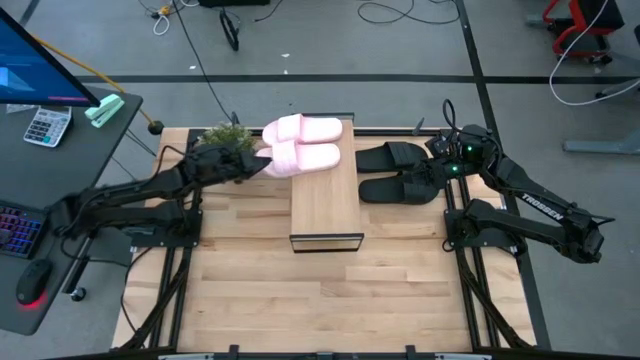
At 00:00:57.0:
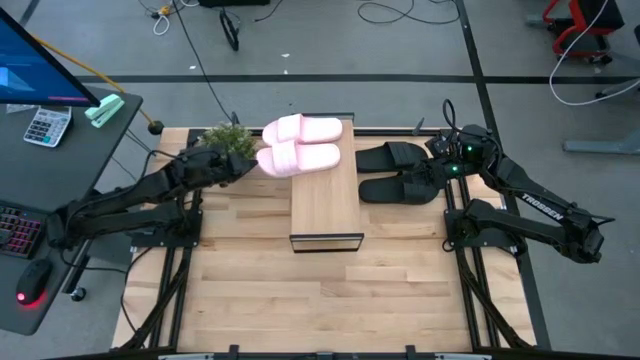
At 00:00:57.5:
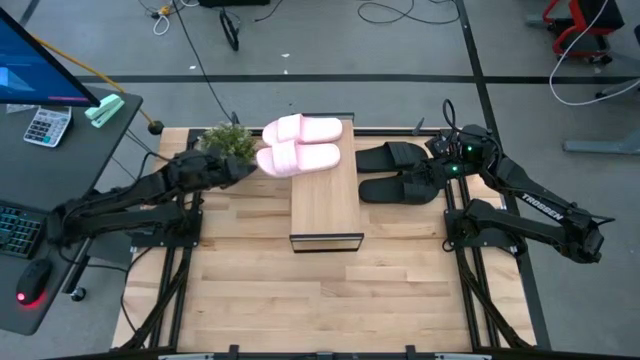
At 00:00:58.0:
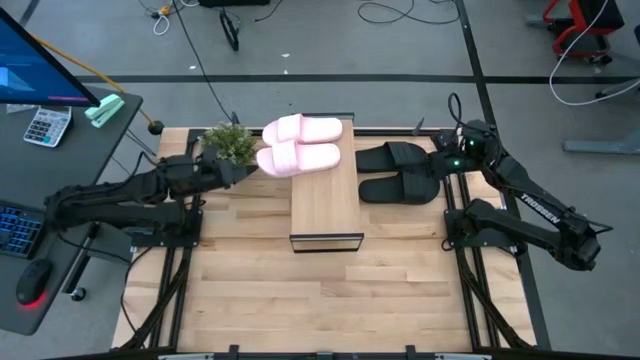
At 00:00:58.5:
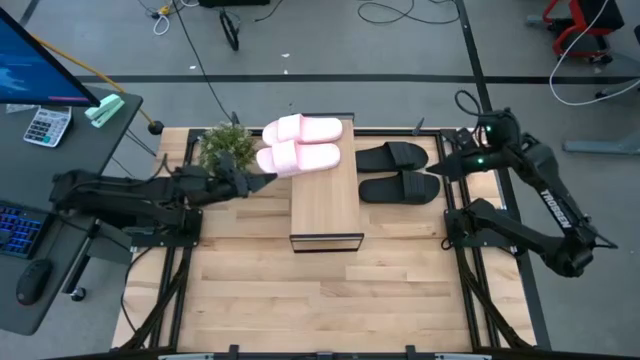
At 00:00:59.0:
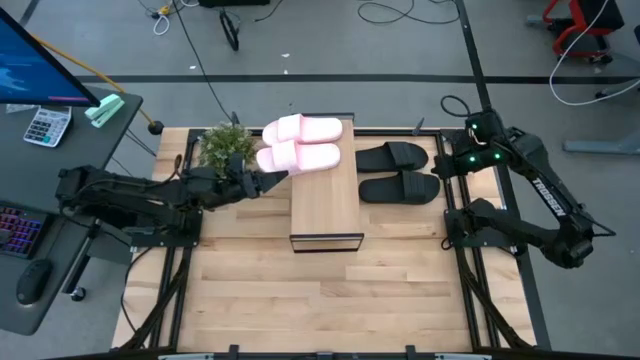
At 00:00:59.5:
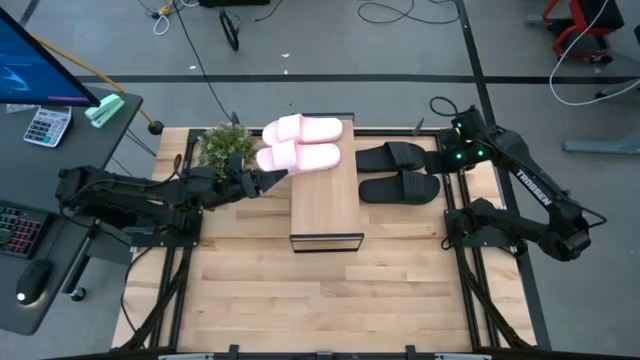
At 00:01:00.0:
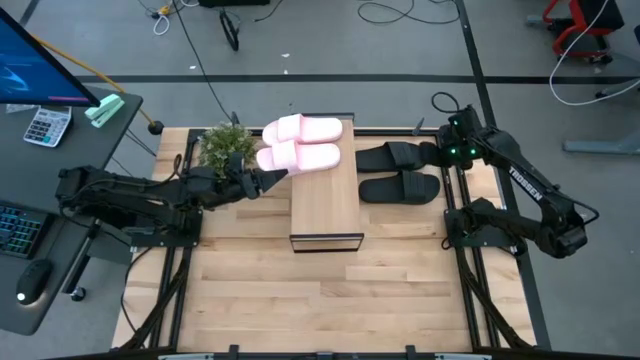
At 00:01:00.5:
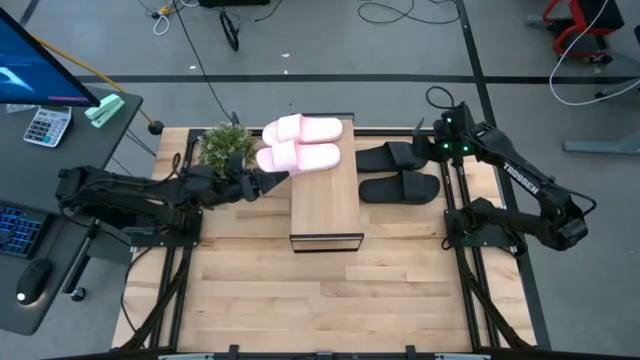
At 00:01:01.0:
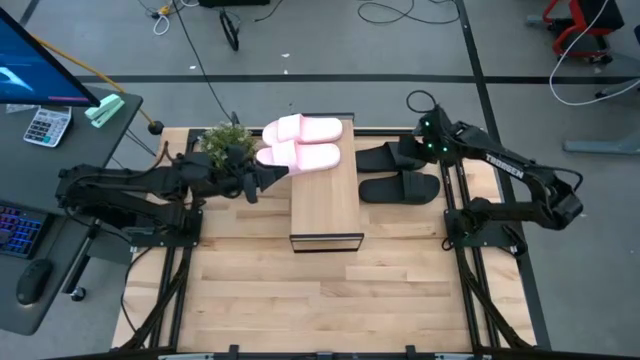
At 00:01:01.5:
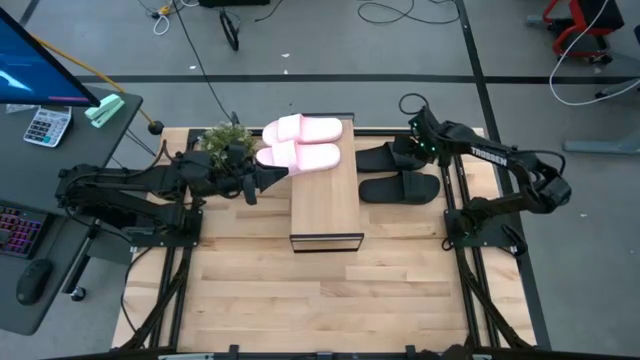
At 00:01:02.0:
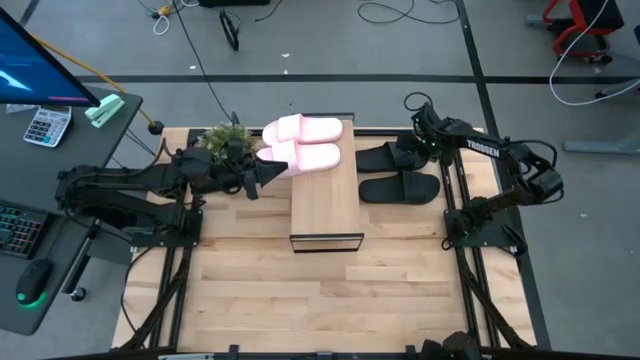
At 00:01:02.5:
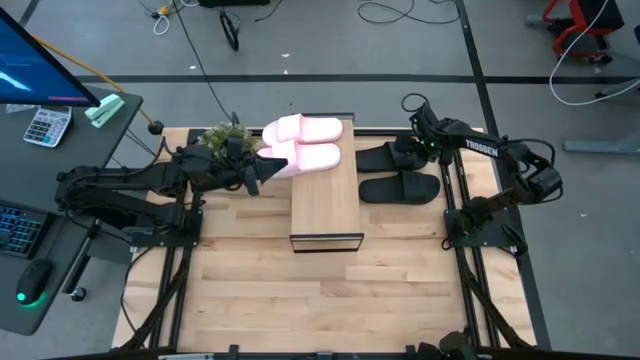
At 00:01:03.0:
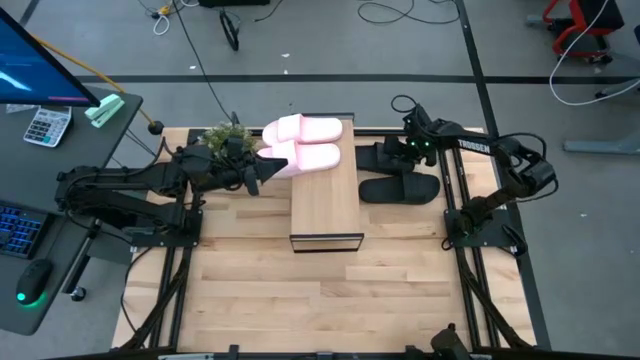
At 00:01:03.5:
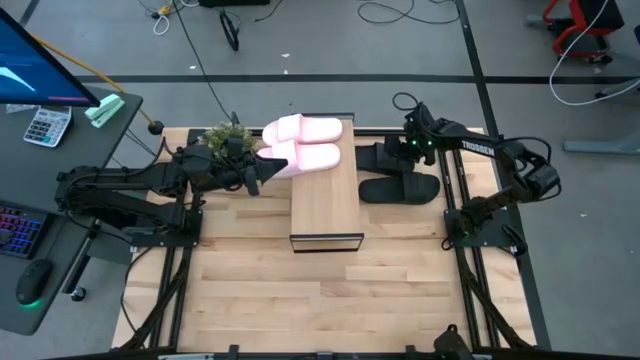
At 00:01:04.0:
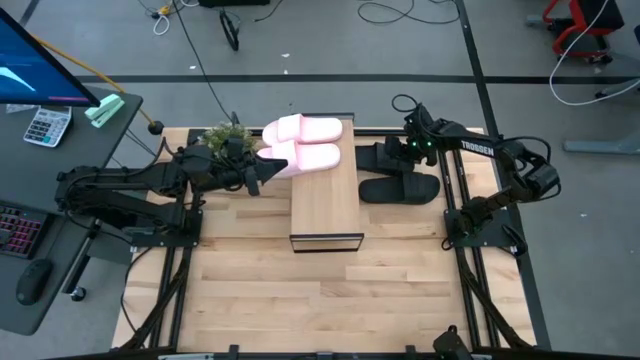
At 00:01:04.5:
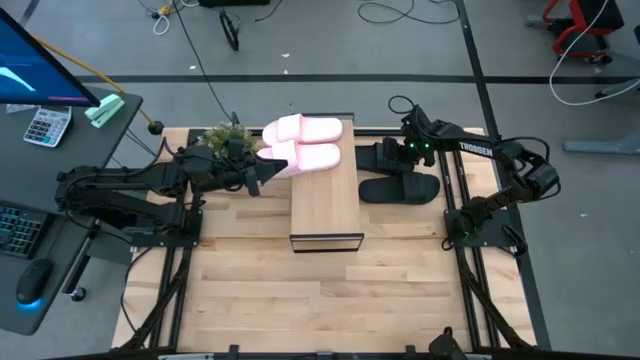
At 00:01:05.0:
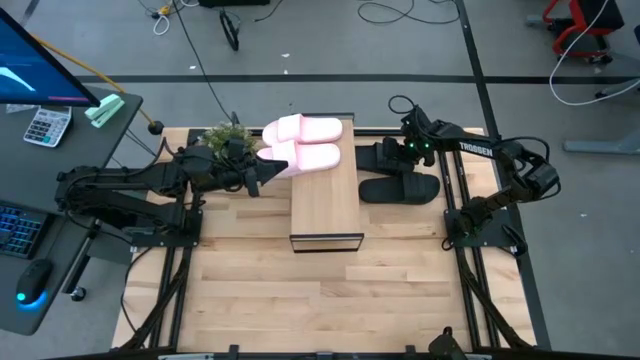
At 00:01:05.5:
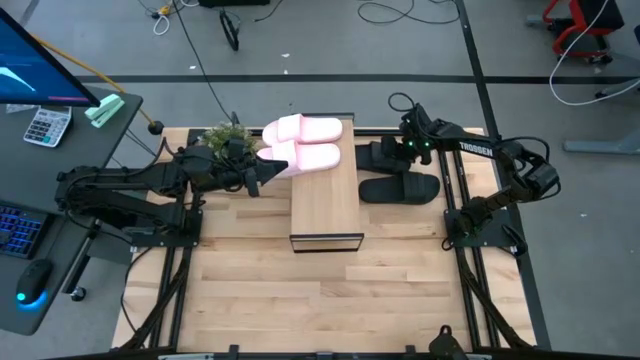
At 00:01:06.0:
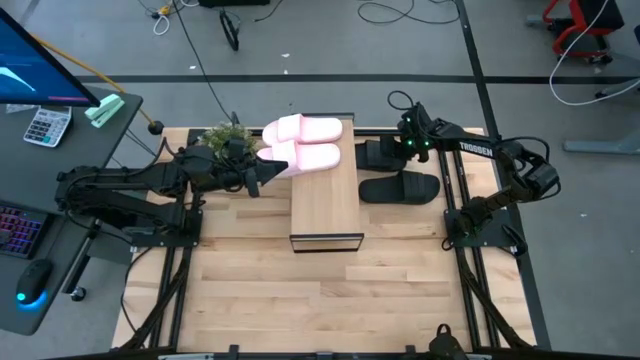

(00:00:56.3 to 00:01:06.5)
Task: Pick and place slides into the shelf
Put the top black slipper on the shelf

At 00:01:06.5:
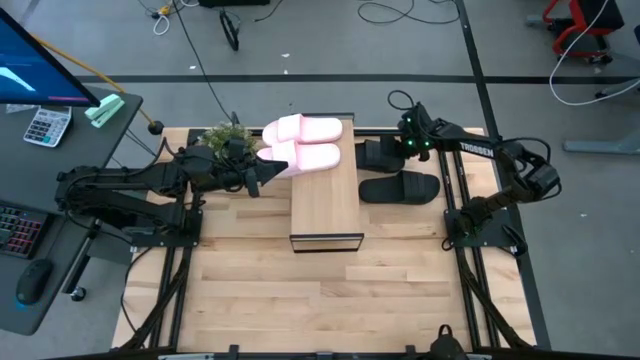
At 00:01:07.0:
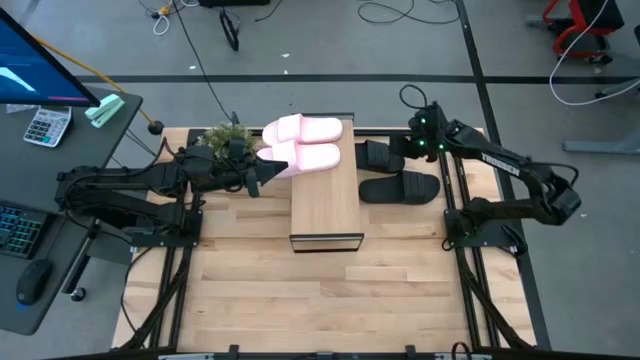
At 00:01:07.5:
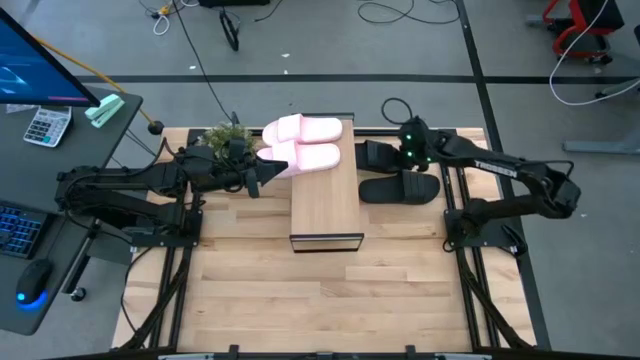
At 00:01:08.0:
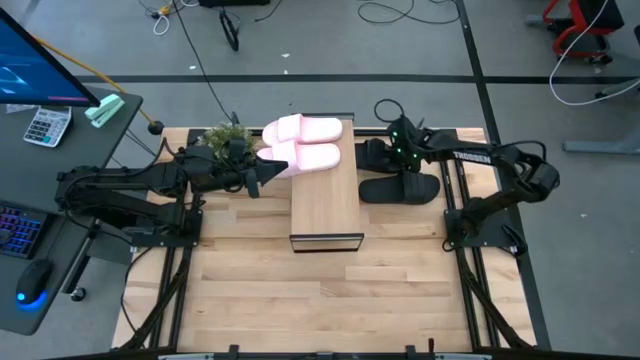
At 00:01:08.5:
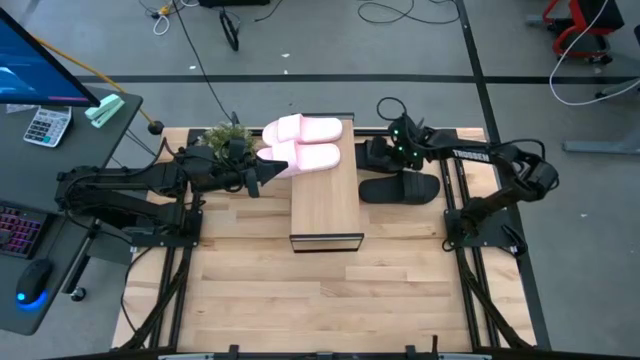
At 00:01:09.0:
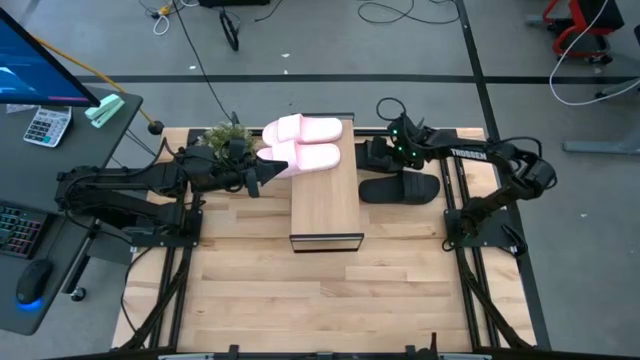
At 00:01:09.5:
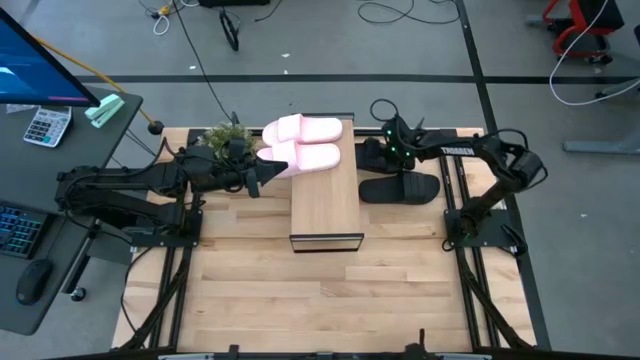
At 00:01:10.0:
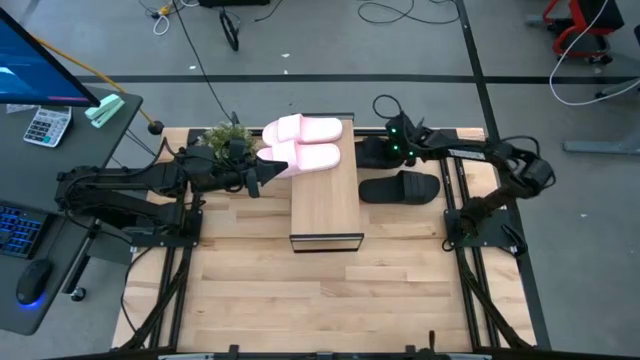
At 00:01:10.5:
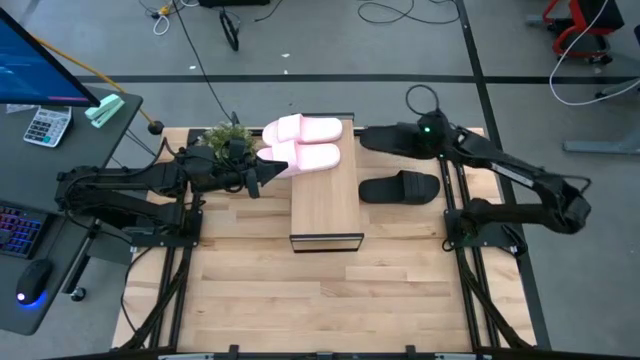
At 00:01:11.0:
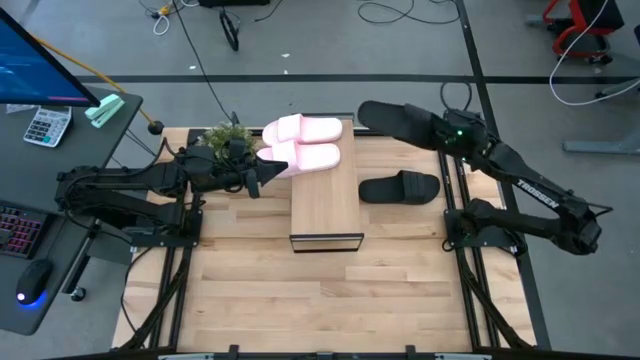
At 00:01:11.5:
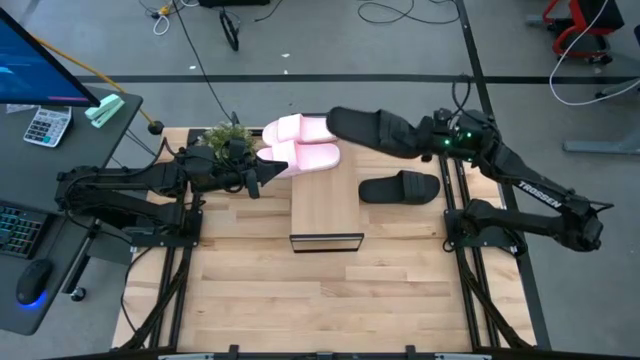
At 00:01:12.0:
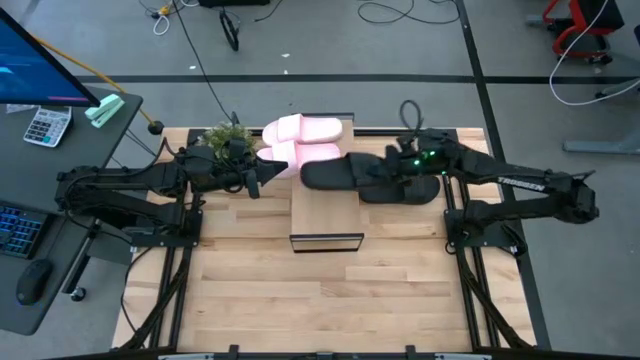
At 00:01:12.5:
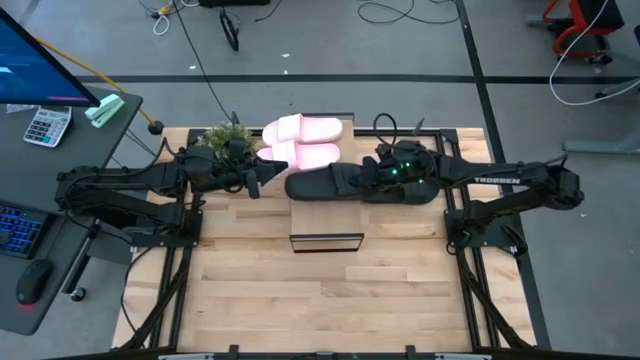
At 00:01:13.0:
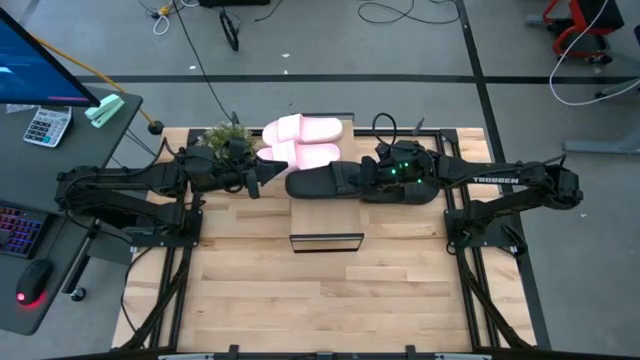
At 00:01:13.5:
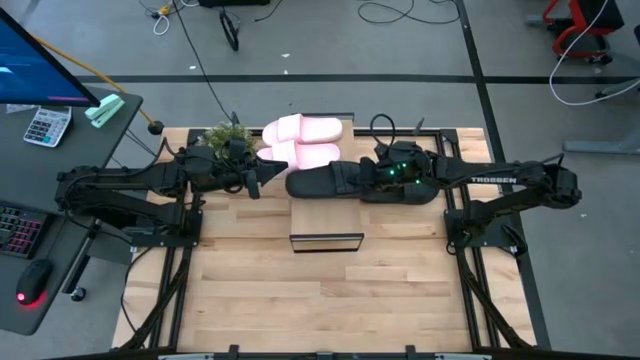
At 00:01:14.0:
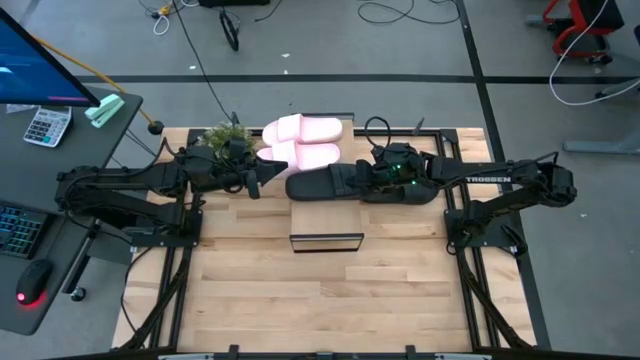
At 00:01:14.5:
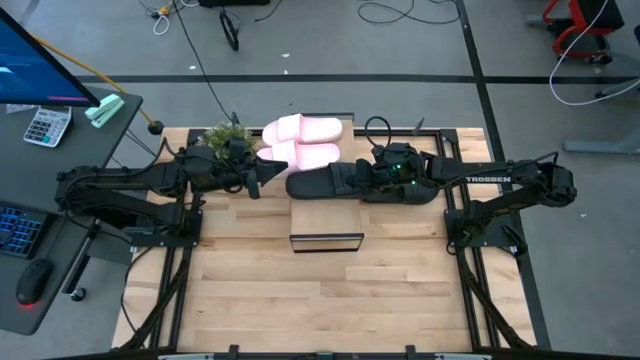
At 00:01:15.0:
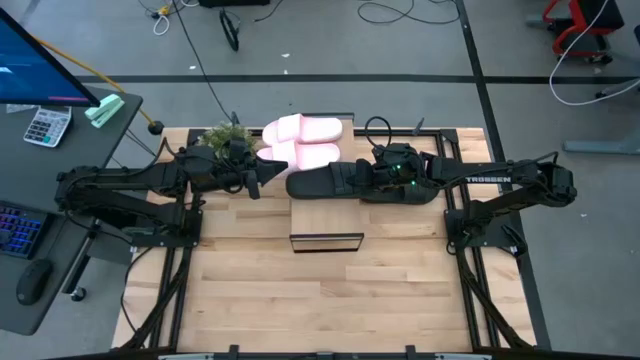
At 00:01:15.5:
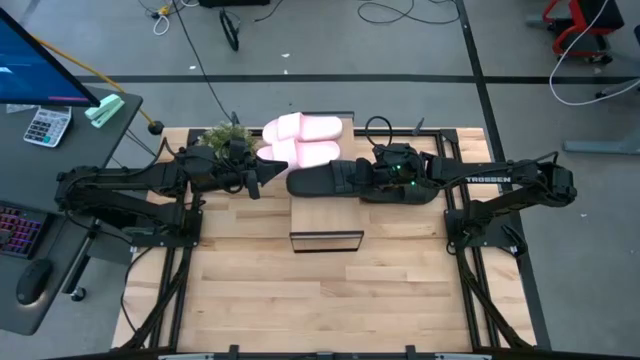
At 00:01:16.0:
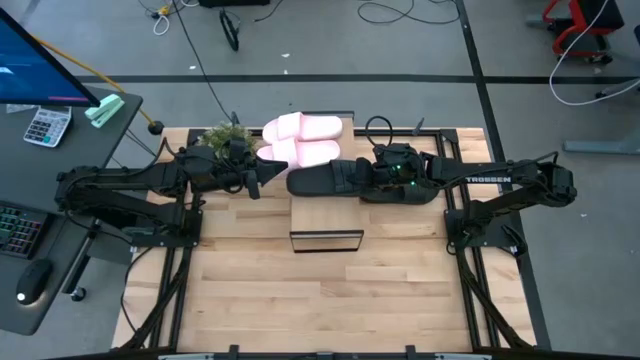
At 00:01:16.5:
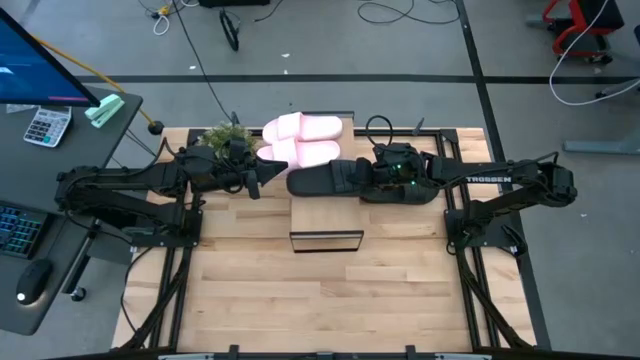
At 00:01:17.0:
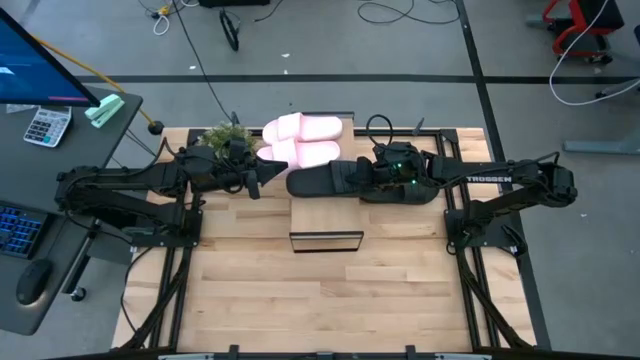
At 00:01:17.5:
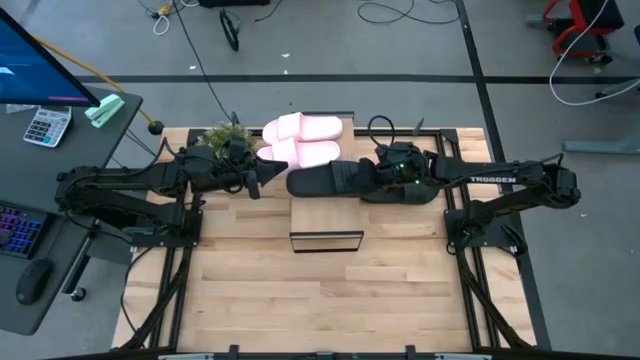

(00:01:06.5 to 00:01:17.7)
Put the top black slipper on the shelf
